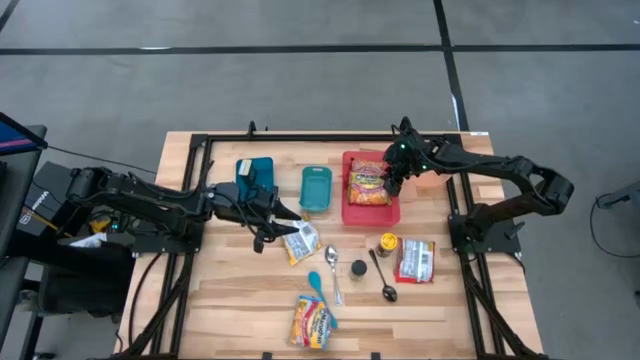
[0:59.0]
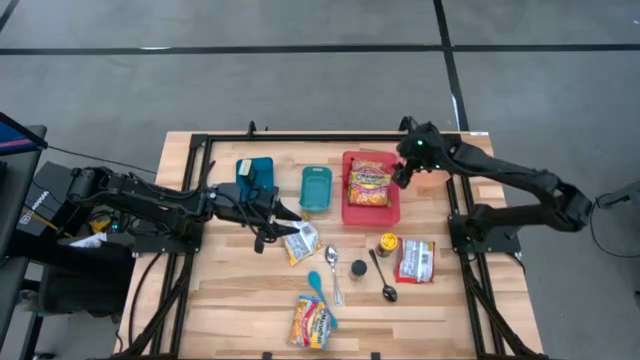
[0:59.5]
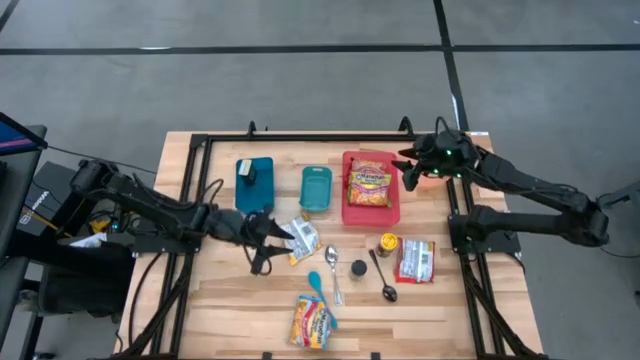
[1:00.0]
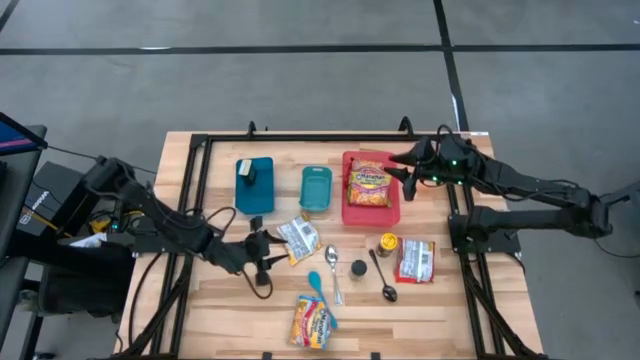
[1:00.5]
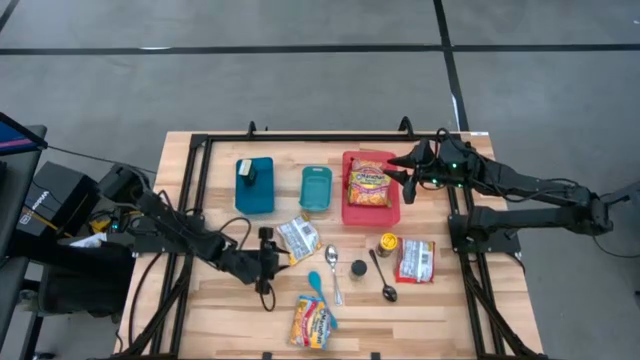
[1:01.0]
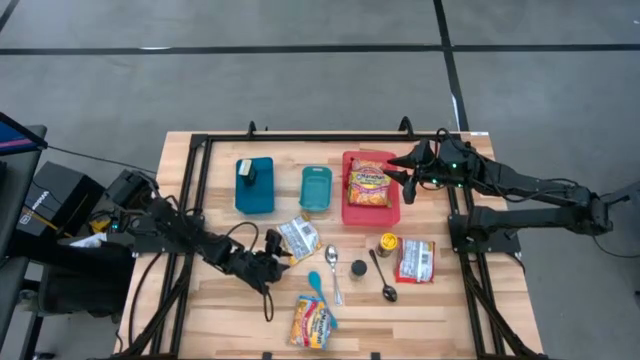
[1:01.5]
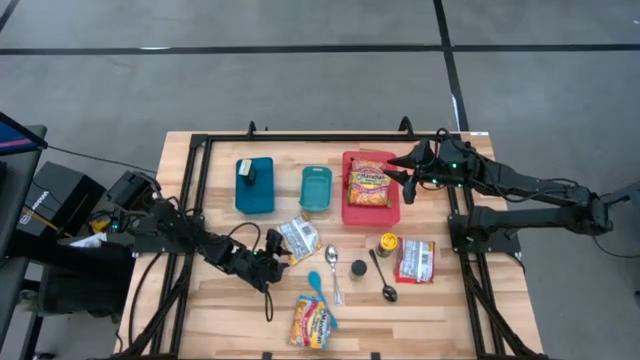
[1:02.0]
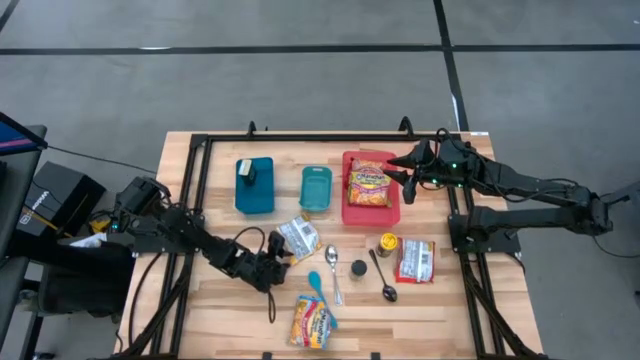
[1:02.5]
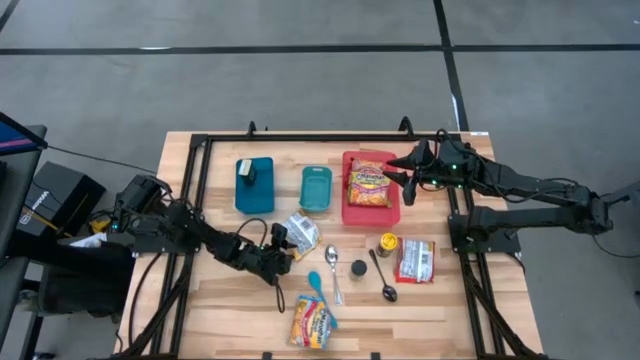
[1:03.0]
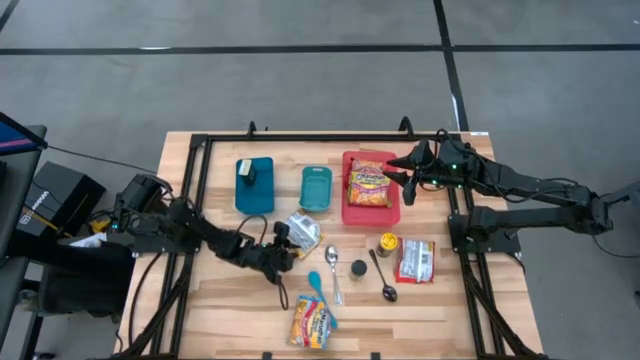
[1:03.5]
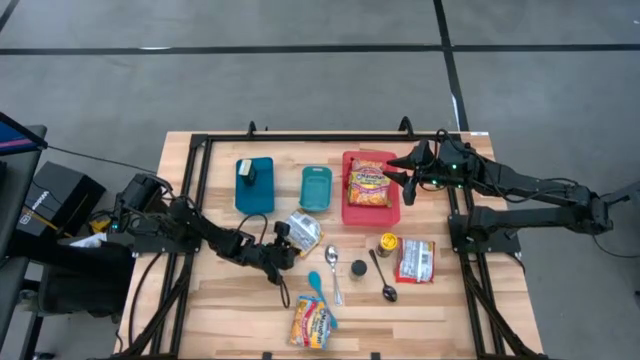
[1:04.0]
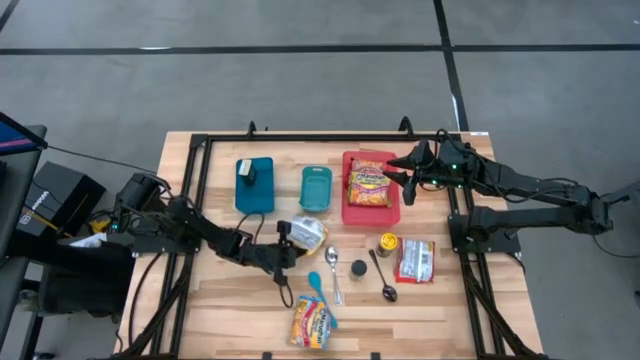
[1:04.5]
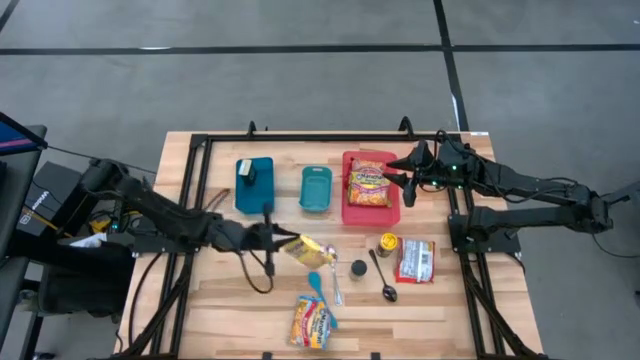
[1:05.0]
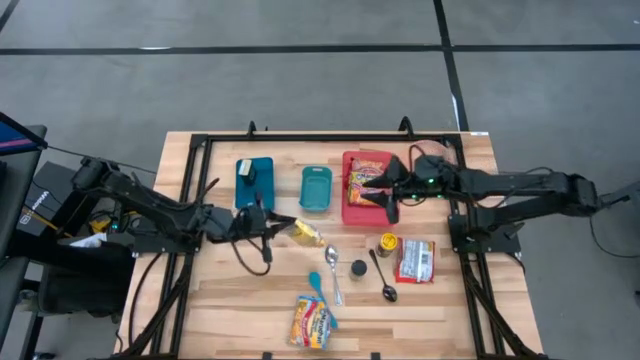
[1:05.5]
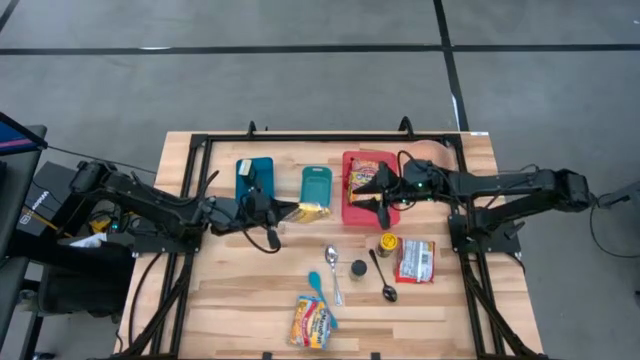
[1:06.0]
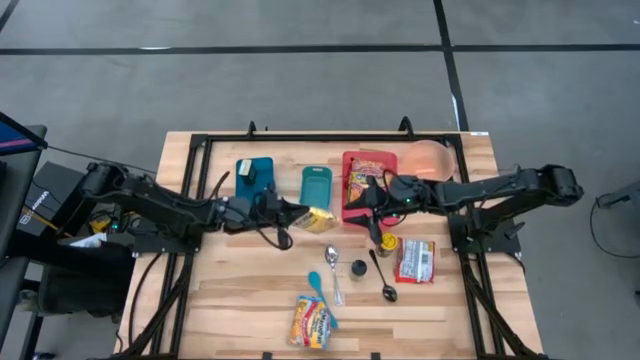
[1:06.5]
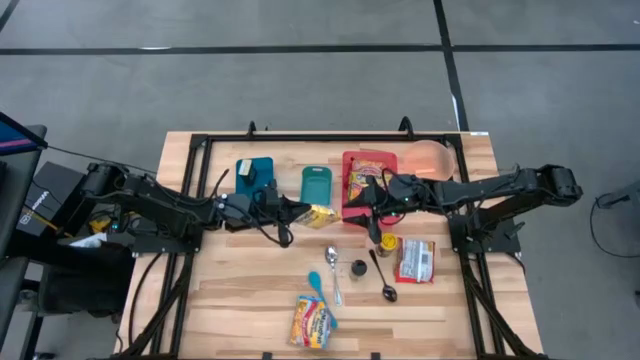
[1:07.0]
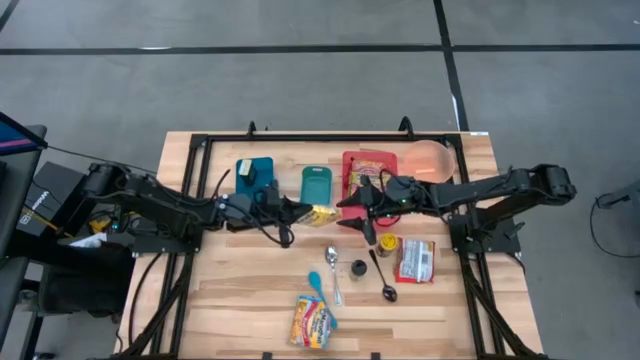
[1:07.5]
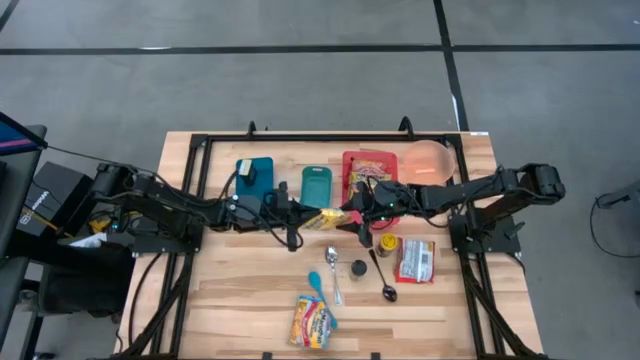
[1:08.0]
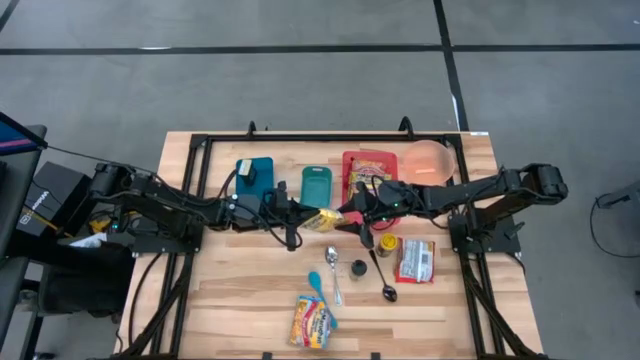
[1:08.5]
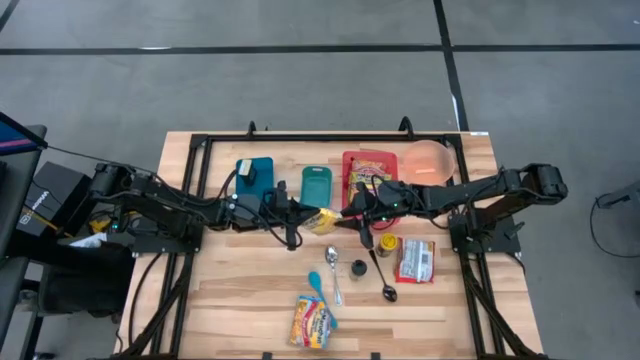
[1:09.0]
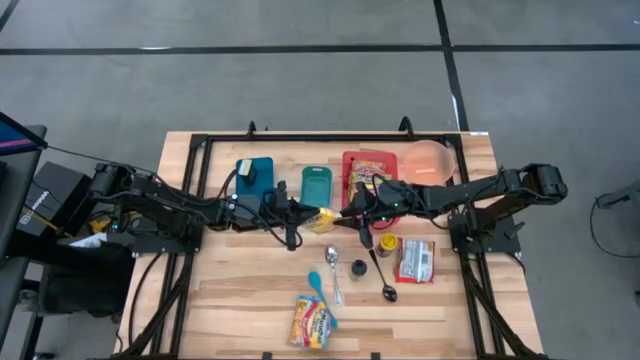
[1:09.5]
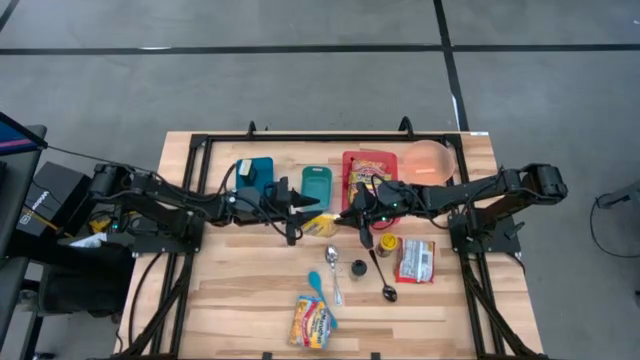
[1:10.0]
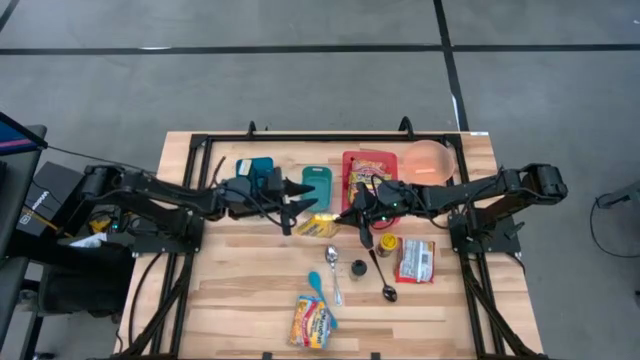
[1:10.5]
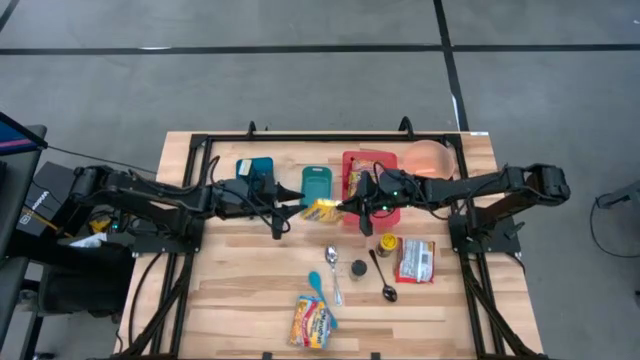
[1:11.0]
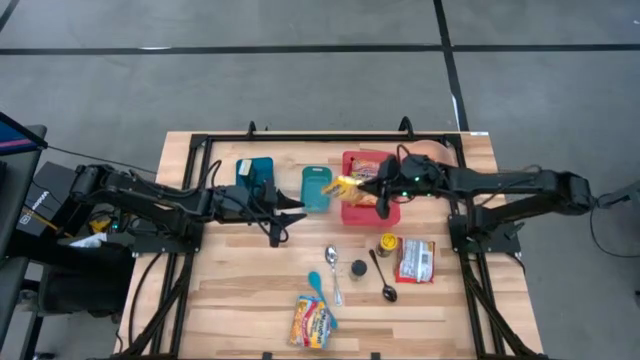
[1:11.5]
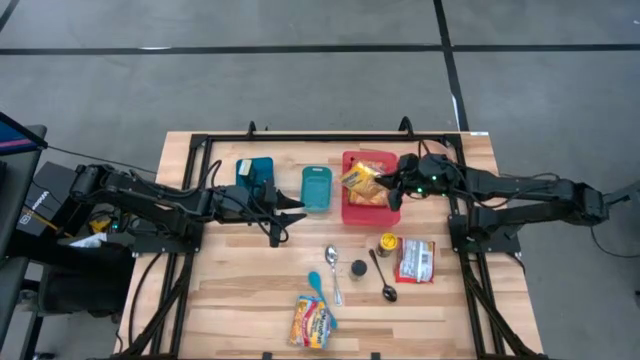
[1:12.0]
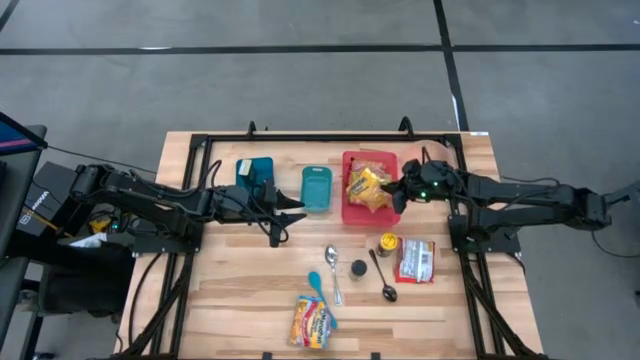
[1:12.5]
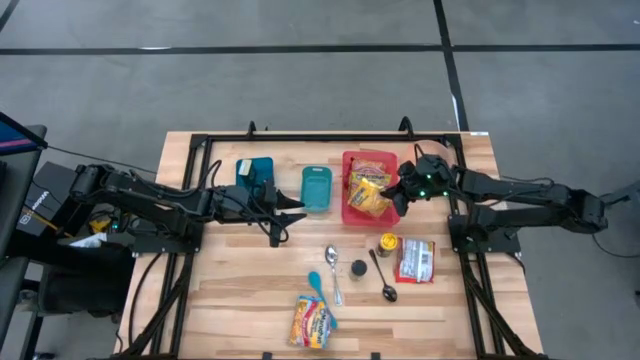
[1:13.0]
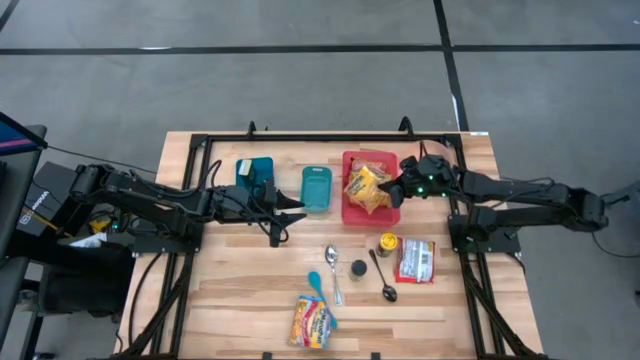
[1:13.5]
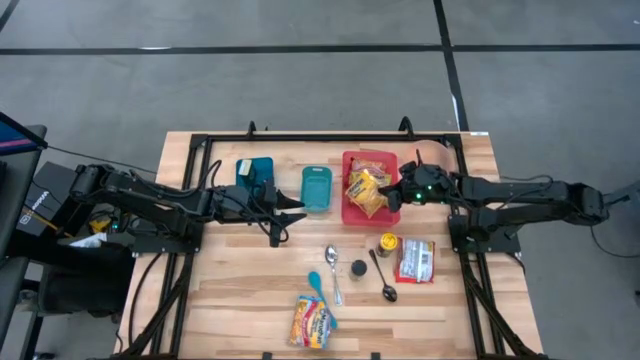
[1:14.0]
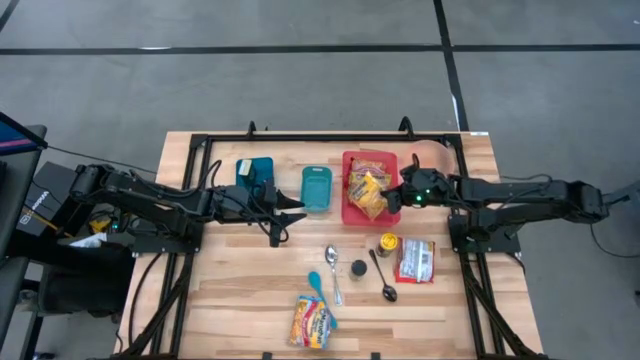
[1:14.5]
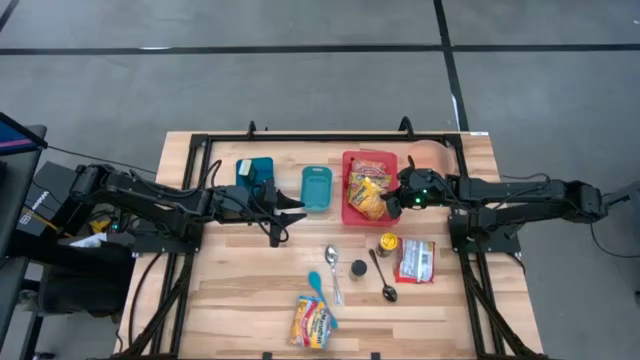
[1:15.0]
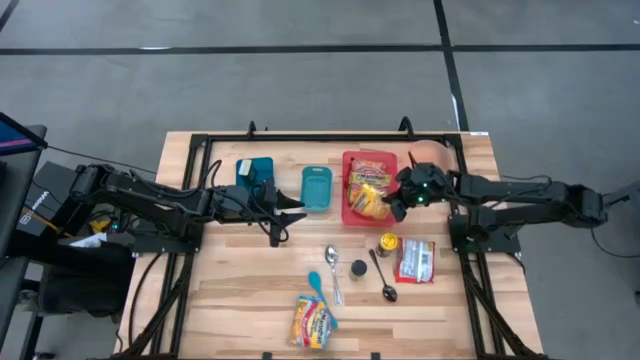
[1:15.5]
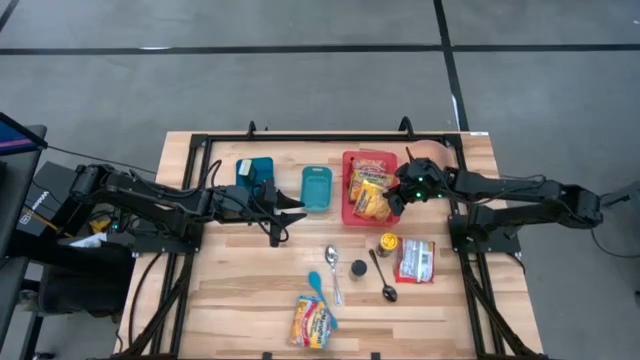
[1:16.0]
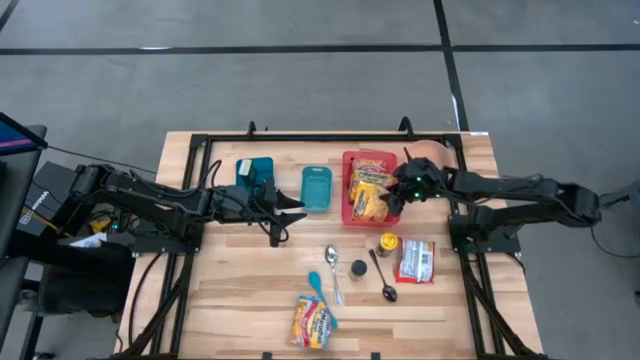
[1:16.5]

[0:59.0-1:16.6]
Task: Pick & Place Food Item
Put the yellow noodle pack into the red bin
